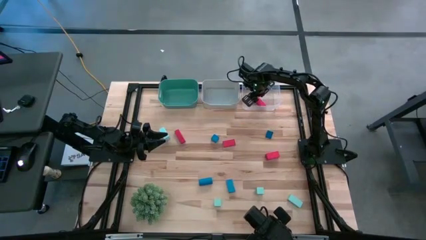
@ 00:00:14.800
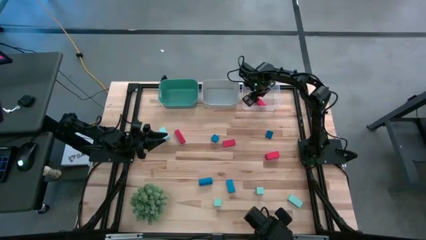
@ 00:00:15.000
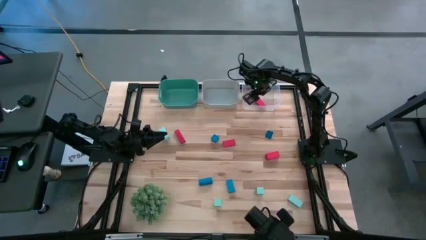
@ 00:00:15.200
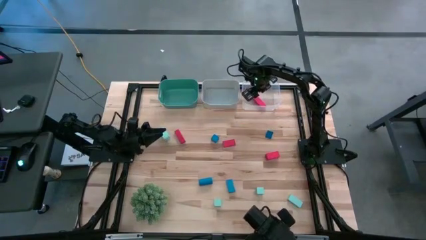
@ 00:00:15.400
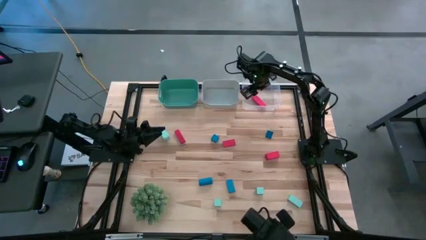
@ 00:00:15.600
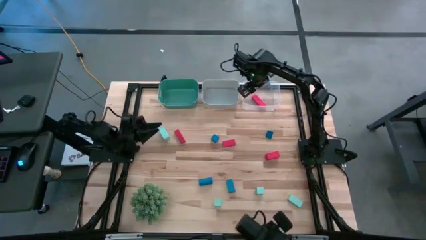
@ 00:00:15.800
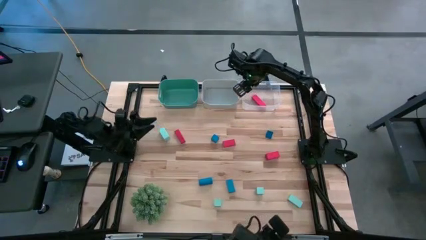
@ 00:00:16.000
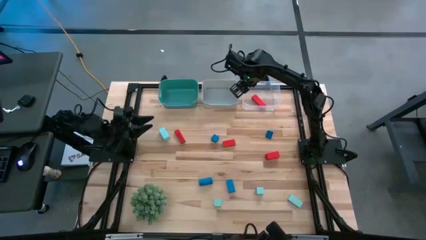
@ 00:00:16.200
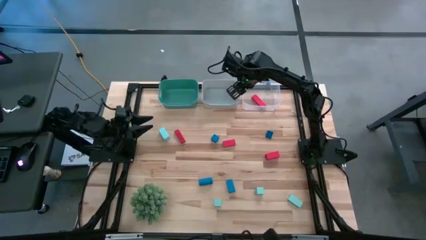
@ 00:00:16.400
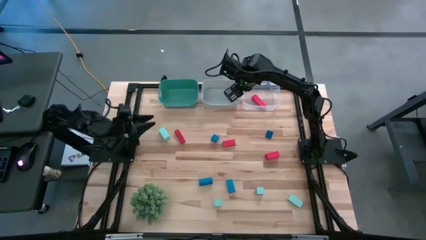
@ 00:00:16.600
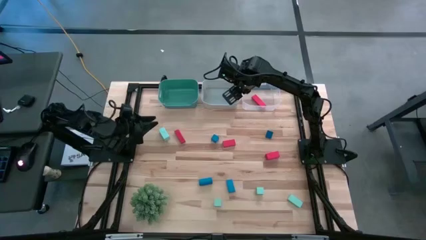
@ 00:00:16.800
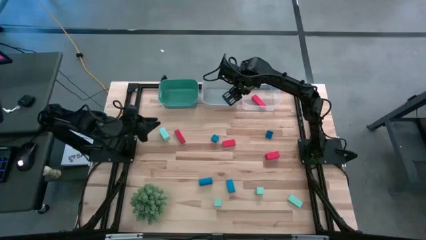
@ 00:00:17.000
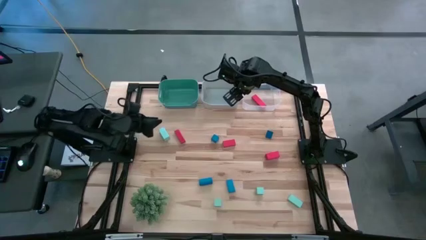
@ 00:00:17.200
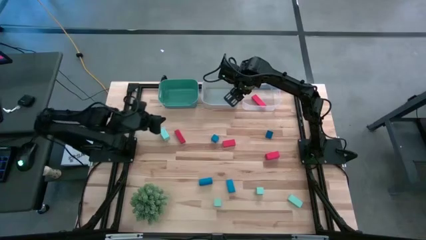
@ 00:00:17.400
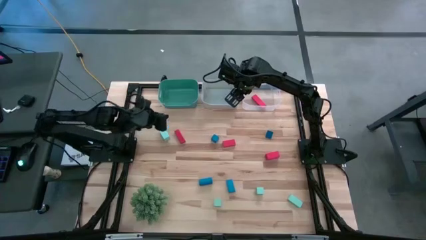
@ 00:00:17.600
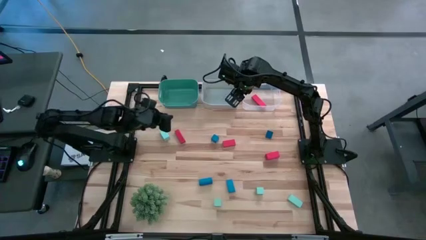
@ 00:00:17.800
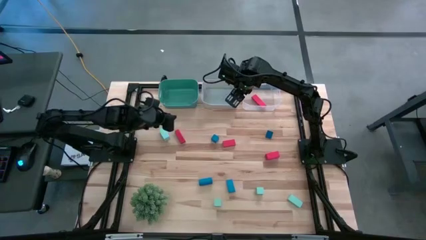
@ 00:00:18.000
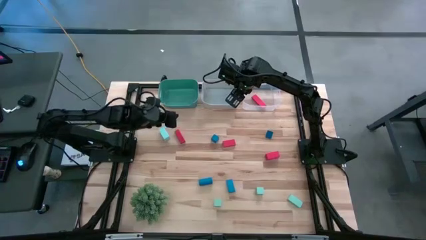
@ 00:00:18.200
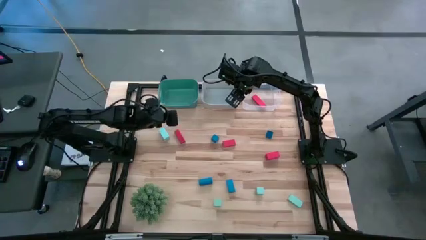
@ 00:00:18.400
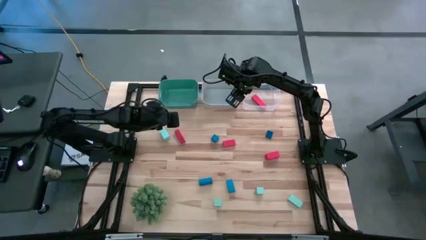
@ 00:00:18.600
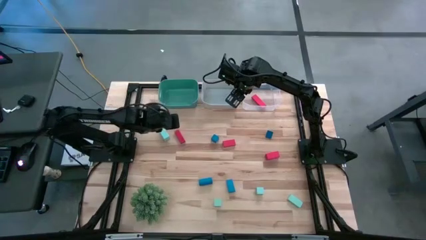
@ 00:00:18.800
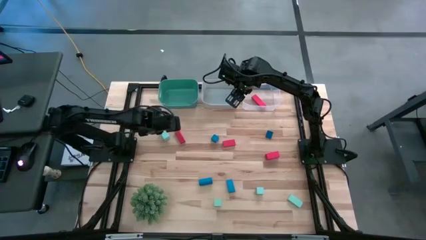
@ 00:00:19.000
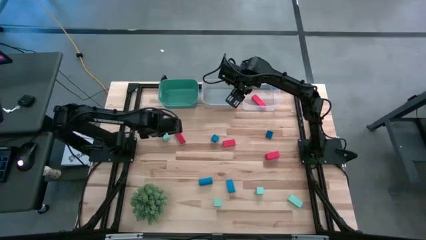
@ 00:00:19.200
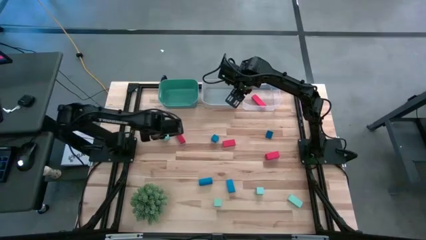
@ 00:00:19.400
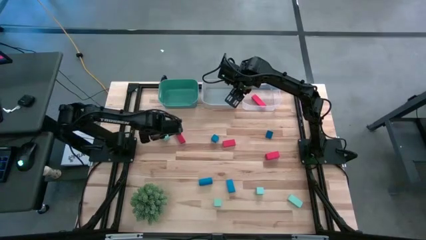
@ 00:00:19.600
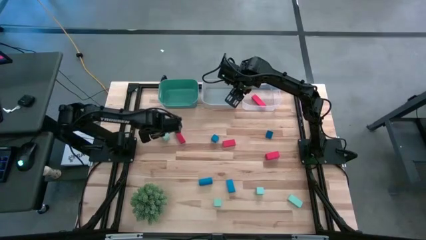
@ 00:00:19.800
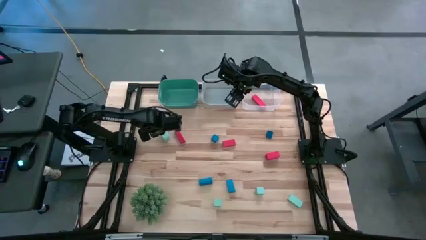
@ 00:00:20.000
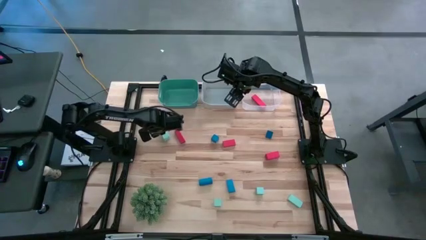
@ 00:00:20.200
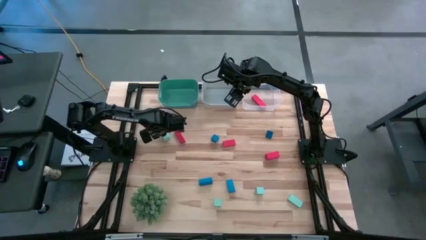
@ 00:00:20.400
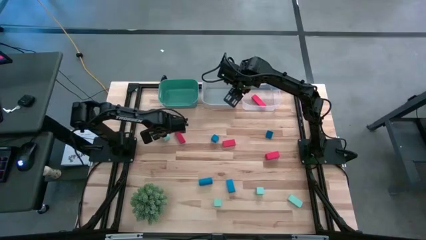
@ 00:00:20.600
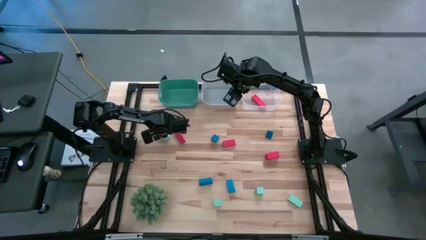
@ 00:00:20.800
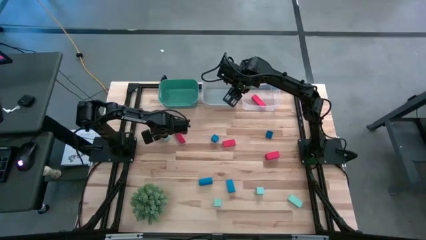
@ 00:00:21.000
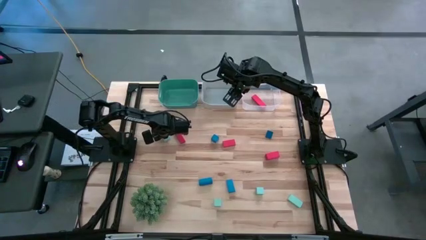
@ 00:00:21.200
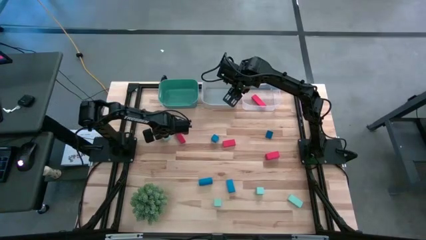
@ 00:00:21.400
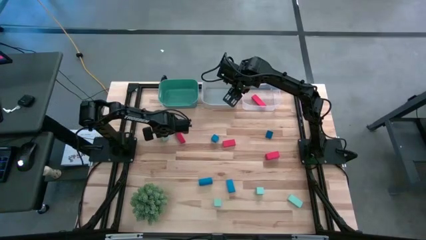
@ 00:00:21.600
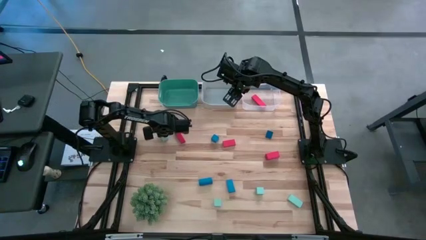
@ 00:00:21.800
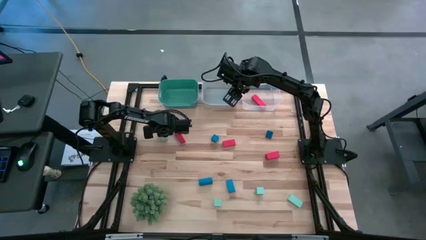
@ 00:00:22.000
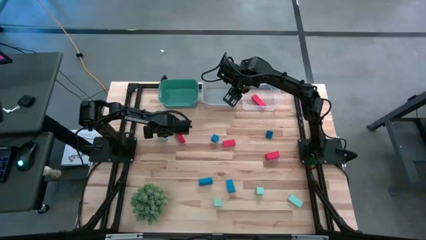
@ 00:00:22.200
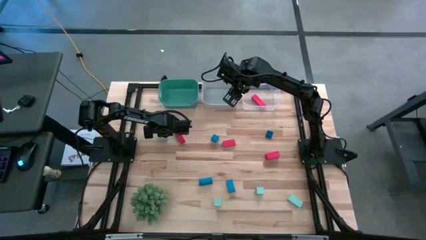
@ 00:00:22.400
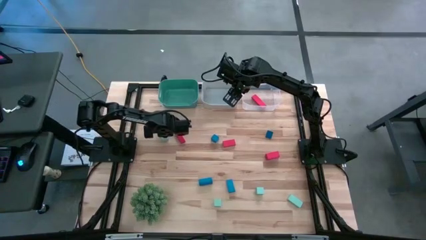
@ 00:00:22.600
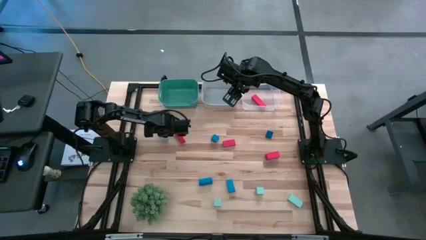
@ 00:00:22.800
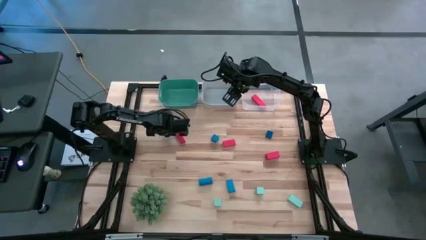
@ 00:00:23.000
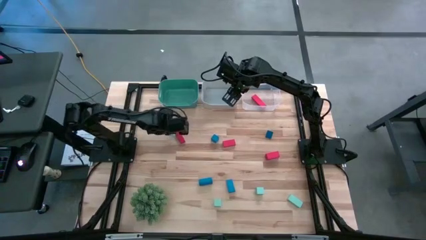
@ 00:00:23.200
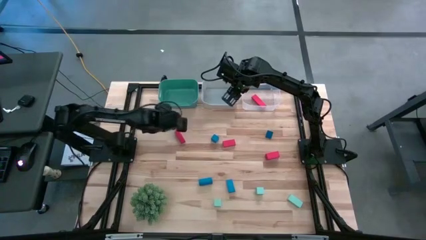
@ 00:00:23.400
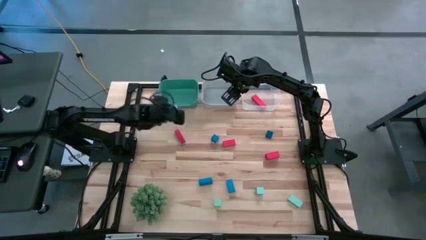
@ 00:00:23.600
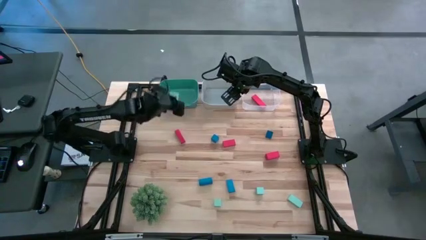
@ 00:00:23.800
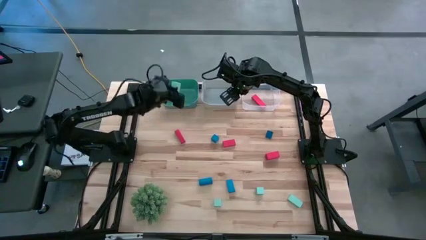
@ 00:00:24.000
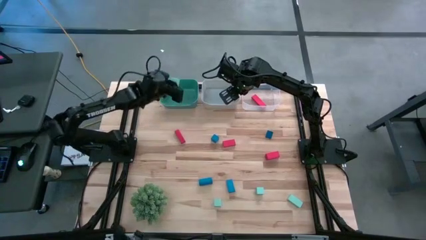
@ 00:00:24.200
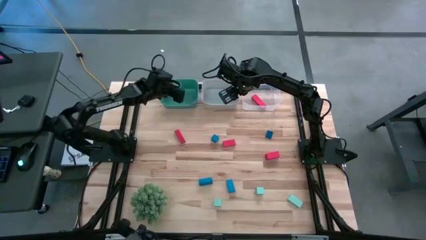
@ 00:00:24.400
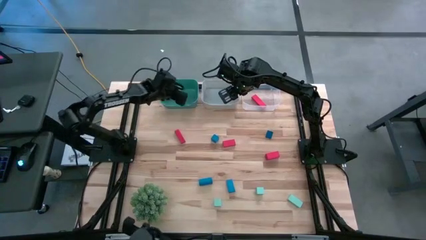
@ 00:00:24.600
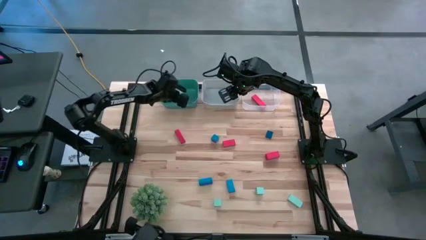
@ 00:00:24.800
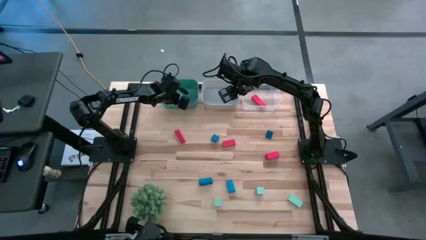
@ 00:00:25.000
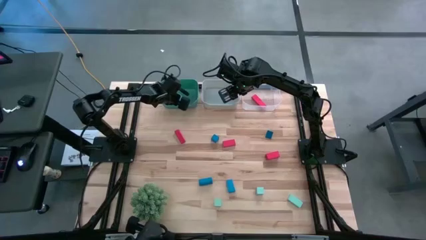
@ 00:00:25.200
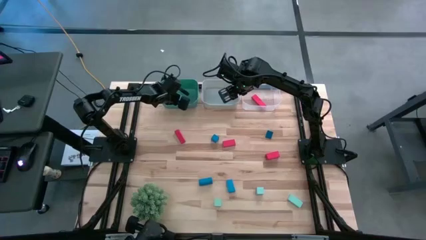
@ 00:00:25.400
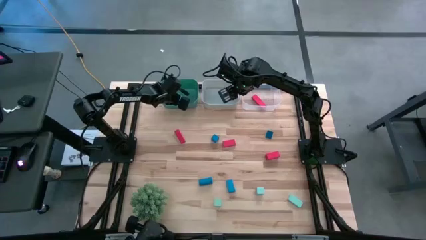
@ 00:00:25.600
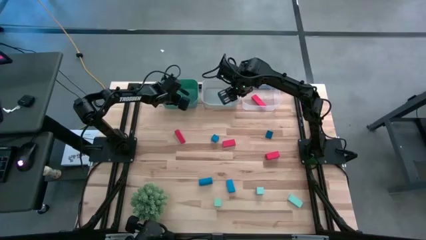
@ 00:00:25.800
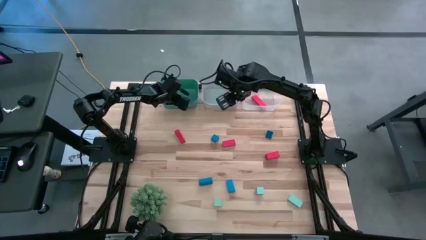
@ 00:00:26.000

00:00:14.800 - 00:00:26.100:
Task: Sort & place blocks by color
Put the light blue block into the green bin

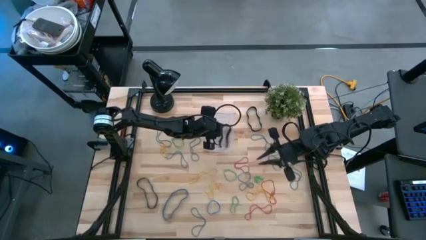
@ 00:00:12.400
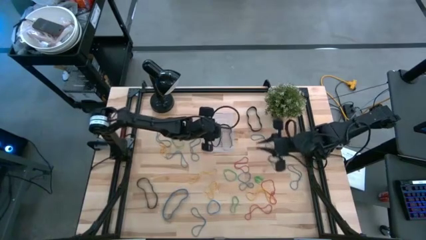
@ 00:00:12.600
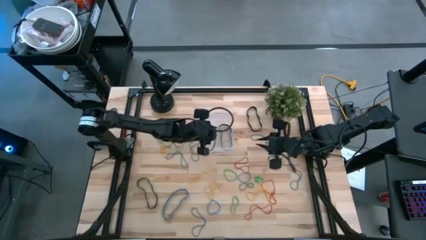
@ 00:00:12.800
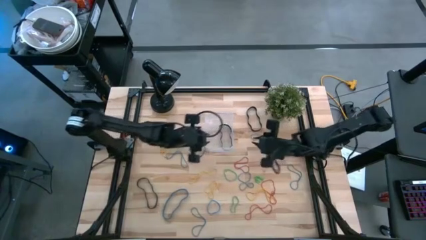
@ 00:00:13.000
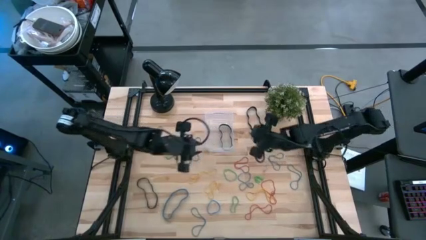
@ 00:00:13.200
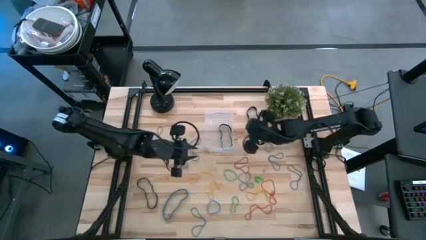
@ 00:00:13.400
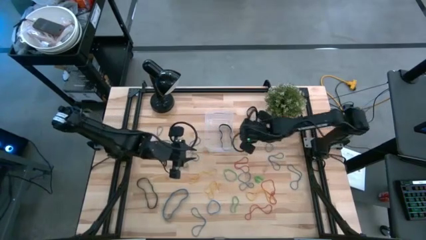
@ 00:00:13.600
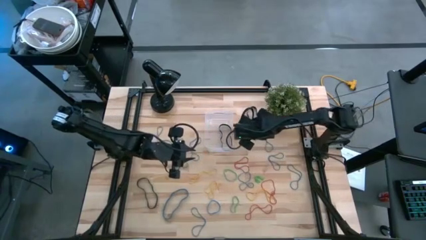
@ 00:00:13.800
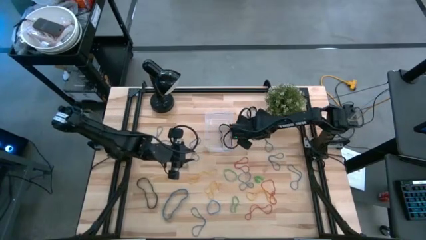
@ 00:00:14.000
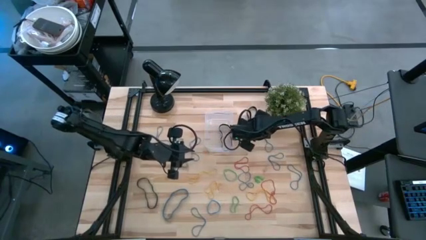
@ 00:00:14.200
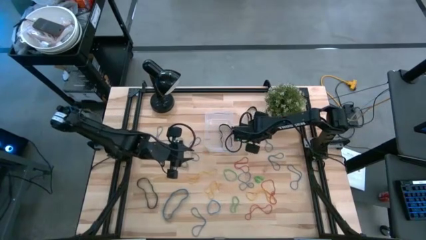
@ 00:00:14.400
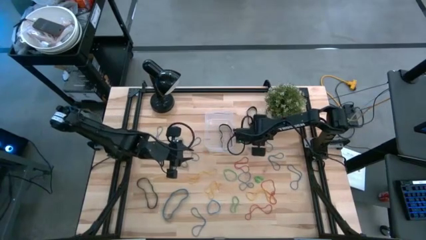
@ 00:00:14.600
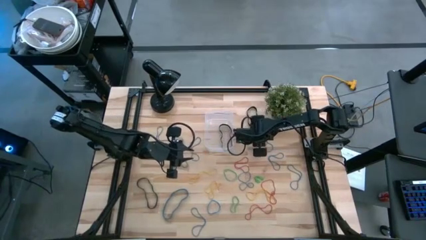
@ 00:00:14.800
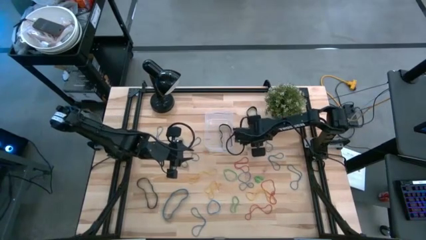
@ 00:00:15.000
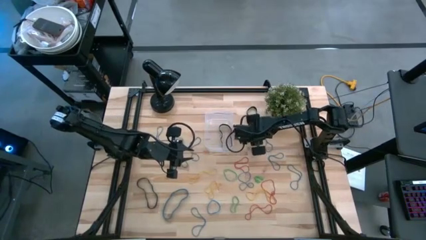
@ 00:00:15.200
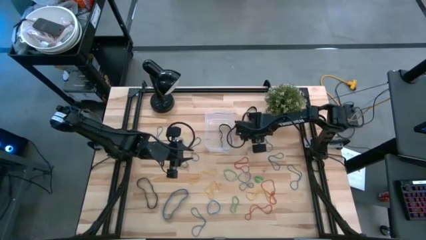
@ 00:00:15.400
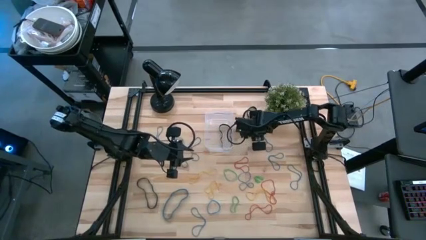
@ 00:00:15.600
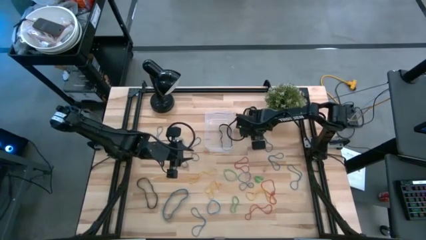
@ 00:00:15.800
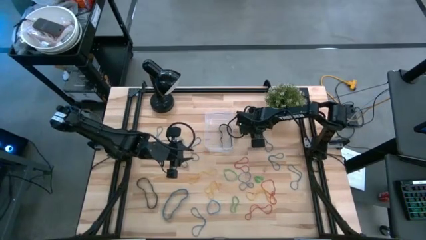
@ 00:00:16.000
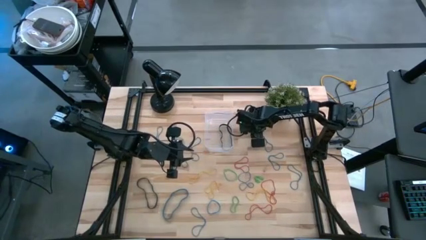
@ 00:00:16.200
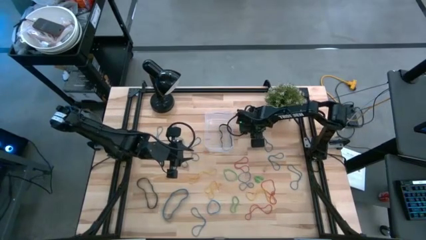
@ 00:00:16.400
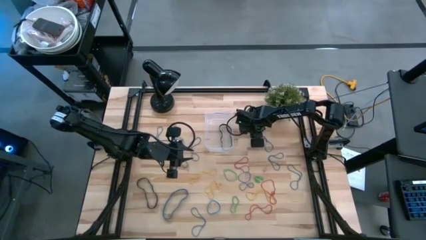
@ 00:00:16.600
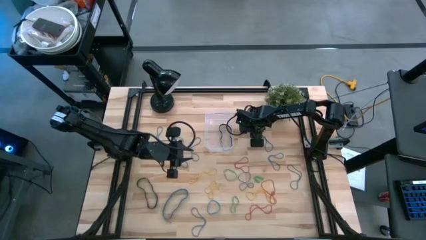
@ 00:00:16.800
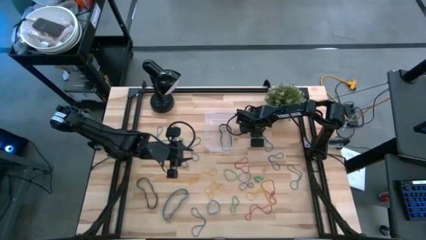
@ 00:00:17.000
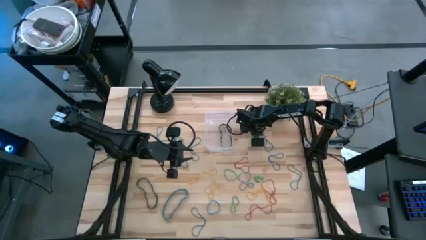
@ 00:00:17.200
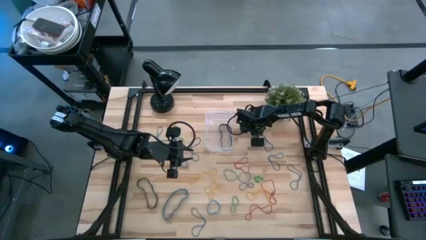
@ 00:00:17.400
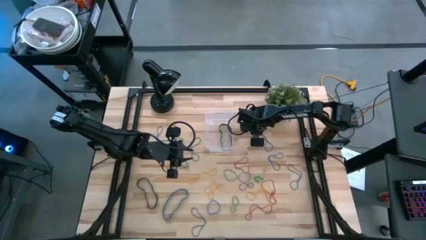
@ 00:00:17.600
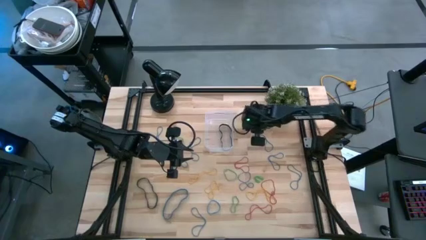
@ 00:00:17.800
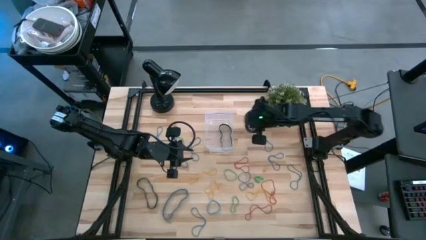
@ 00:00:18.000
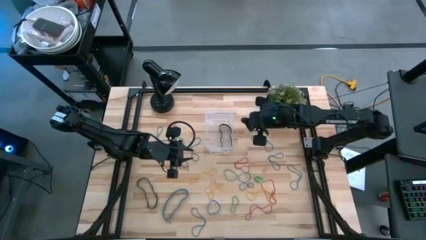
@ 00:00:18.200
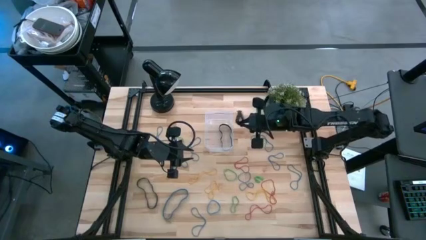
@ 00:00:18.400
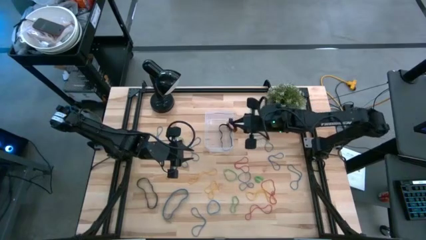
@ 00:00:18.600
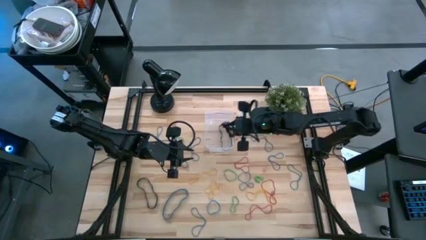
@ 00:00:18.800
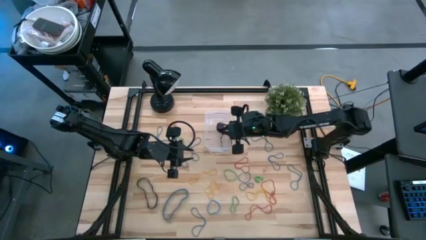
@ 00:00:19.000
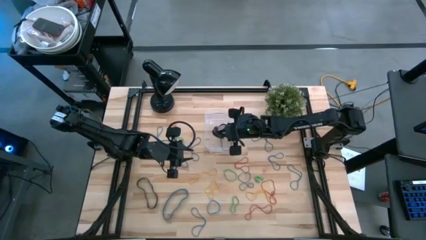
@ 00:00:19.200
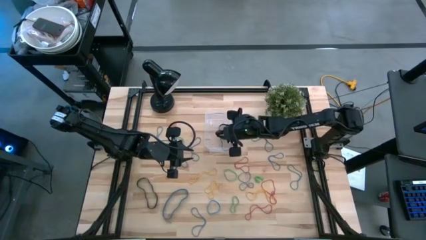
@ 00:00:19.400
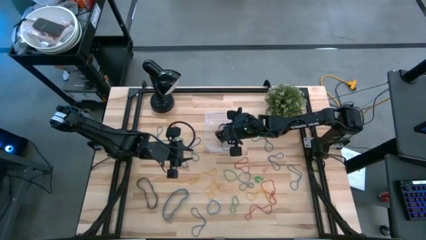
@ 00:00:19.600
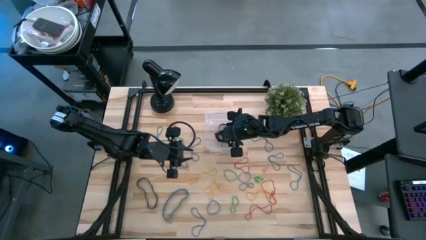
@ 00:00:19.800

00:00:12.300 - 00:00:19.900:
Task: Pick and place rubber bands into bin
Put black rubberband into the transparent bin
